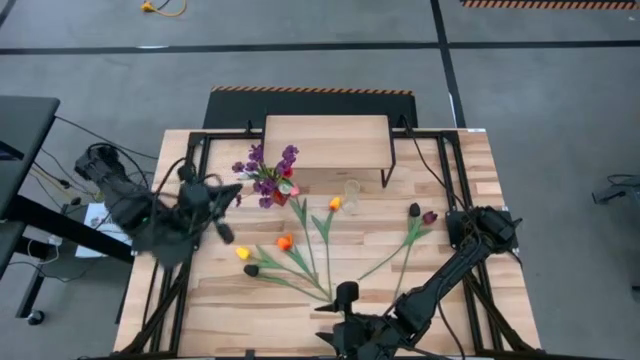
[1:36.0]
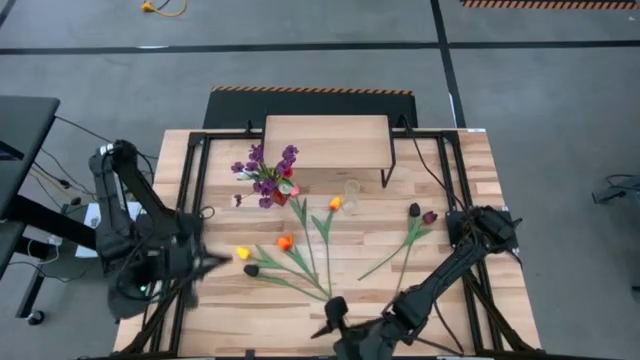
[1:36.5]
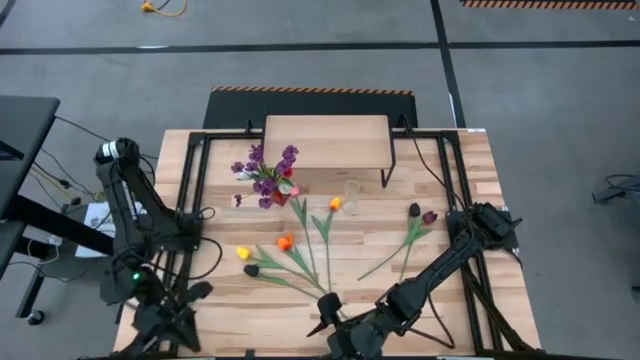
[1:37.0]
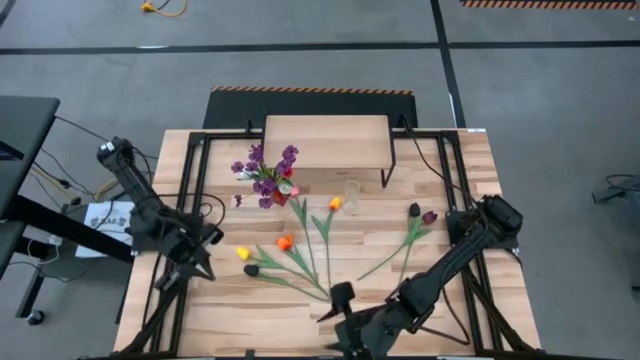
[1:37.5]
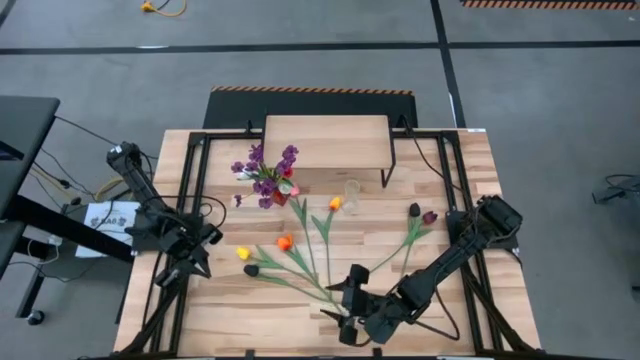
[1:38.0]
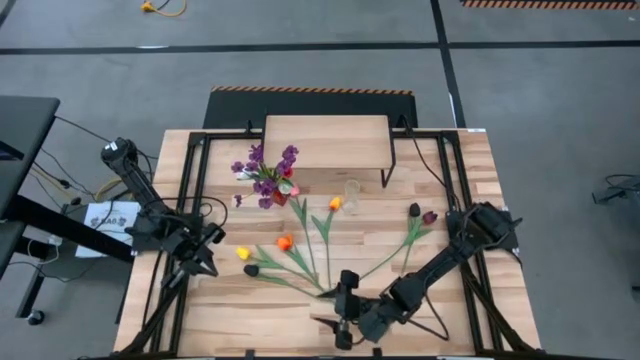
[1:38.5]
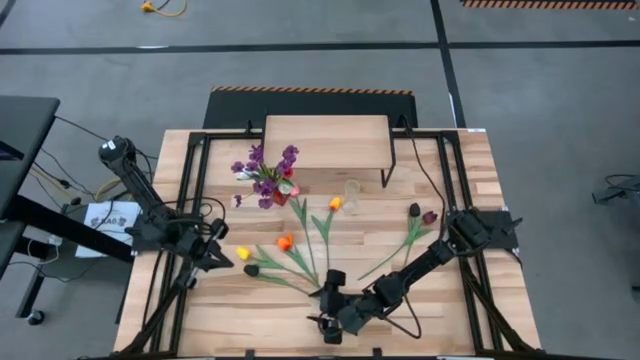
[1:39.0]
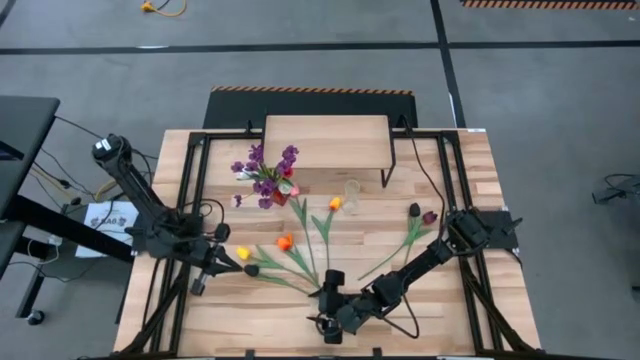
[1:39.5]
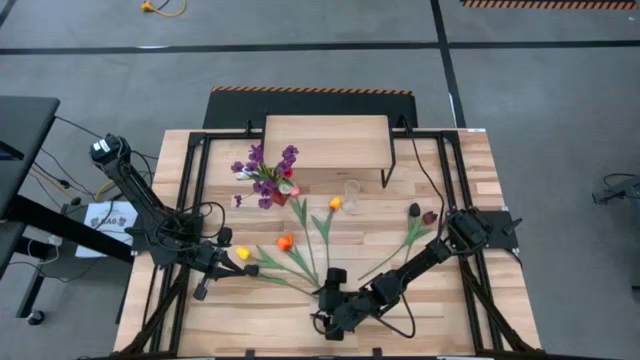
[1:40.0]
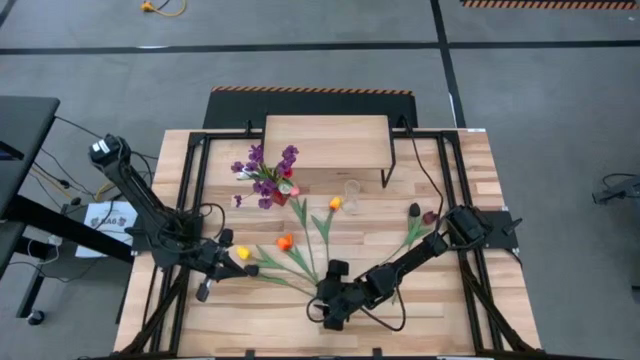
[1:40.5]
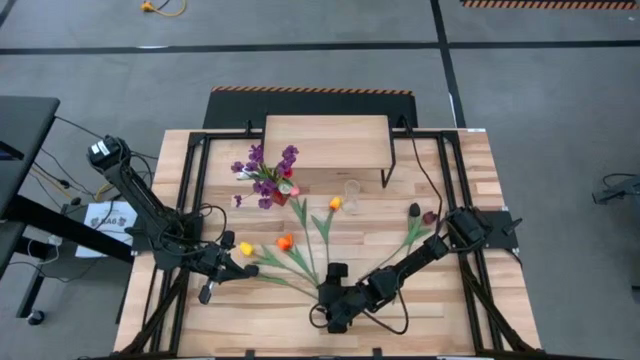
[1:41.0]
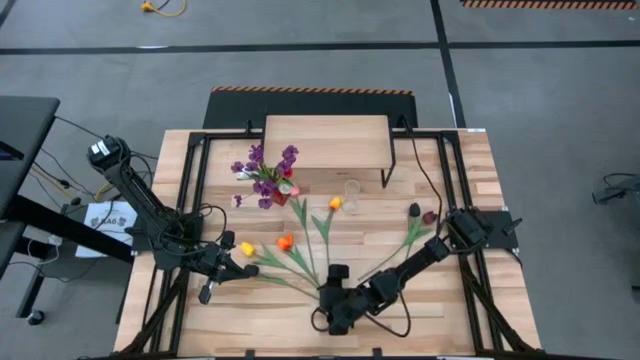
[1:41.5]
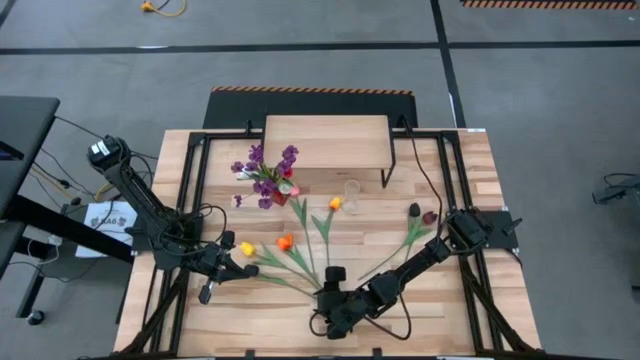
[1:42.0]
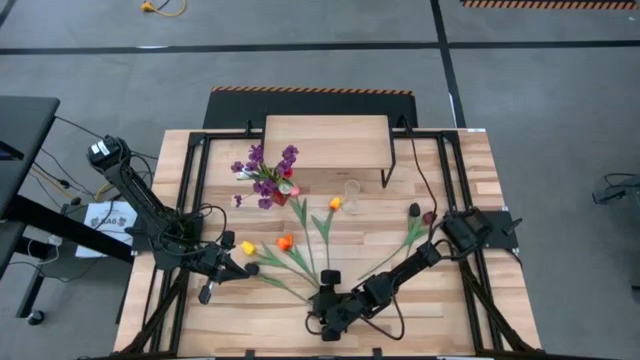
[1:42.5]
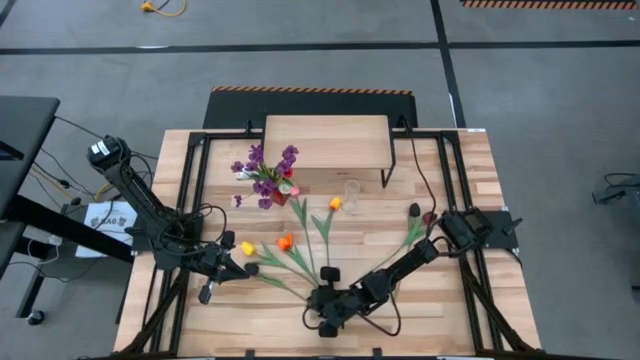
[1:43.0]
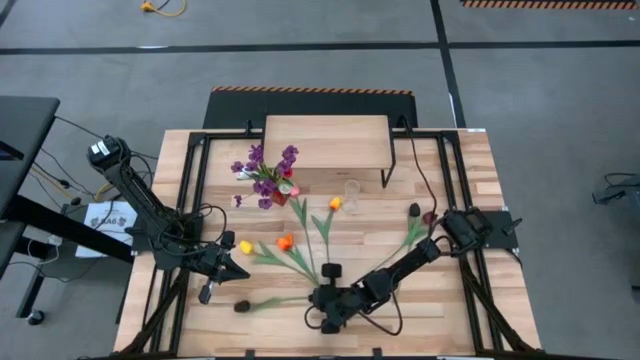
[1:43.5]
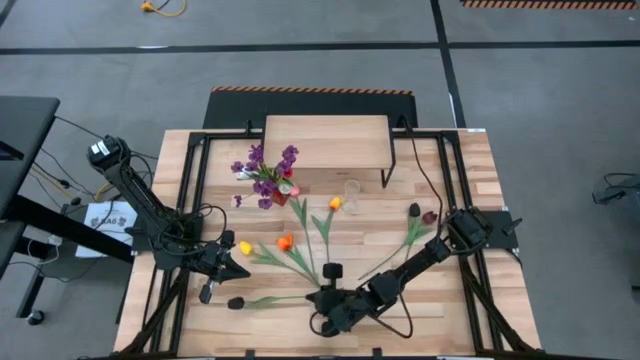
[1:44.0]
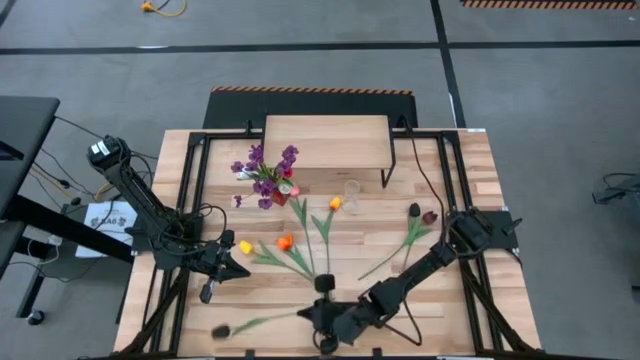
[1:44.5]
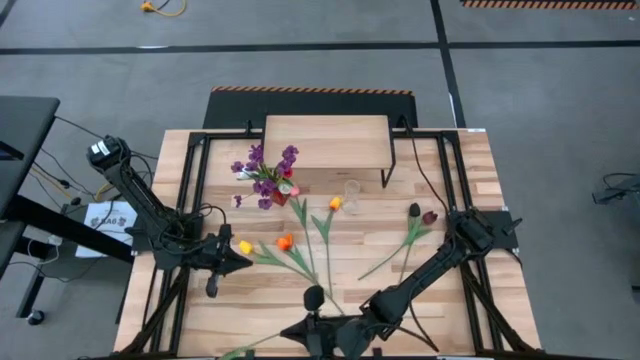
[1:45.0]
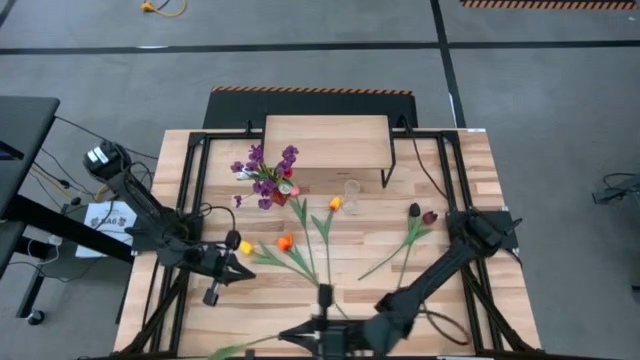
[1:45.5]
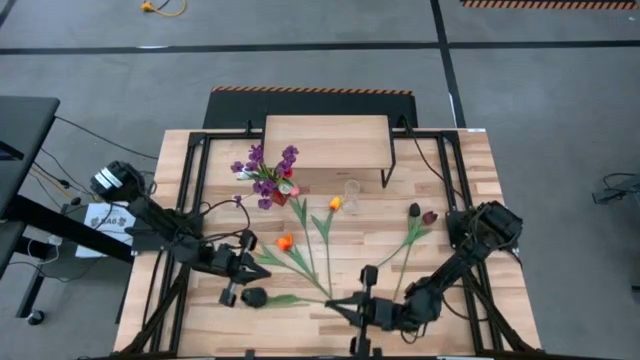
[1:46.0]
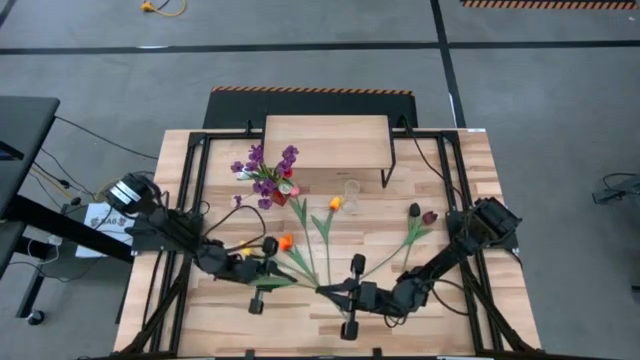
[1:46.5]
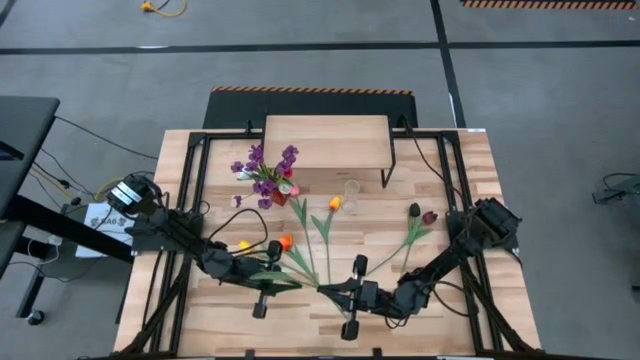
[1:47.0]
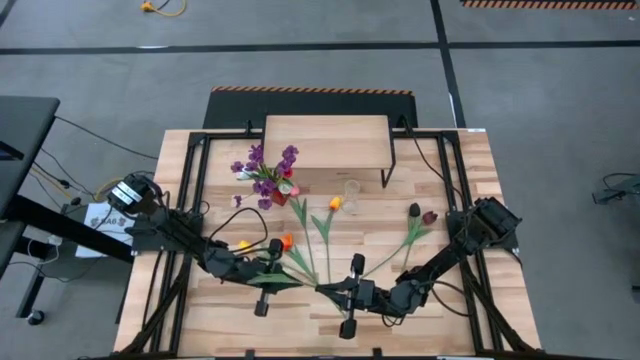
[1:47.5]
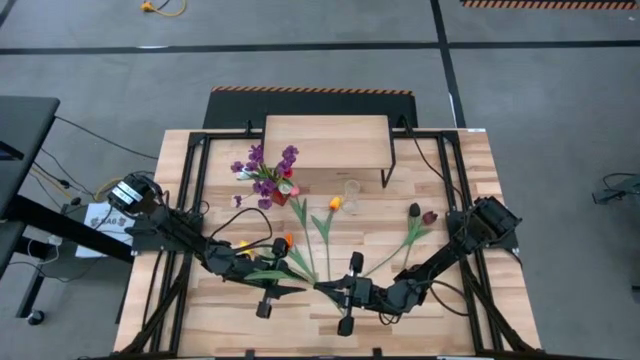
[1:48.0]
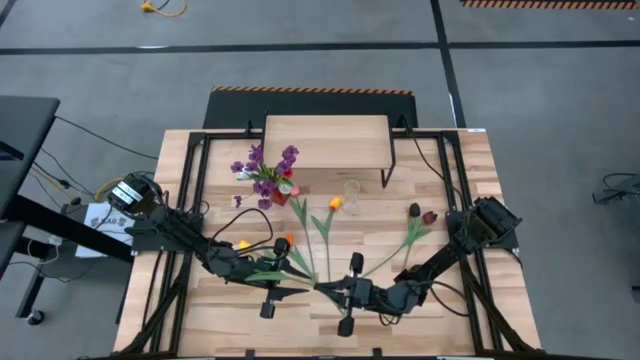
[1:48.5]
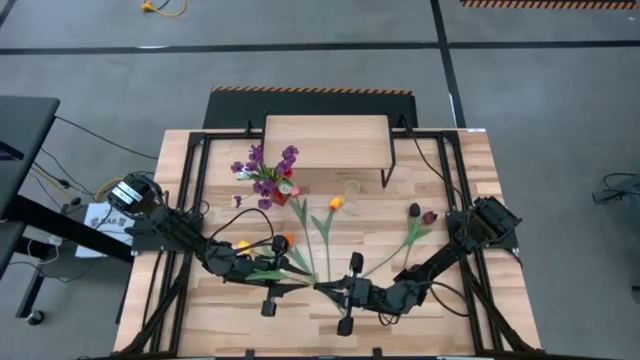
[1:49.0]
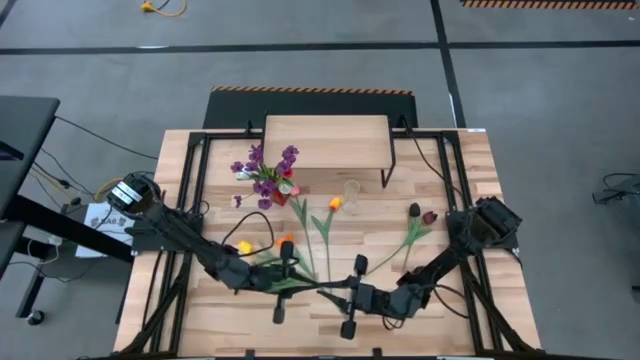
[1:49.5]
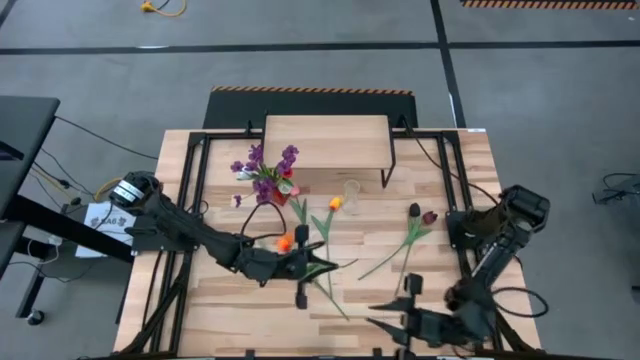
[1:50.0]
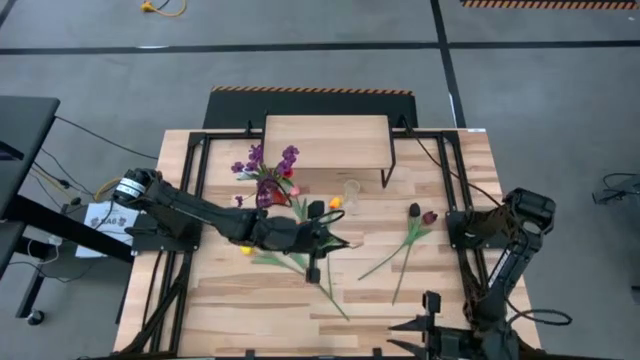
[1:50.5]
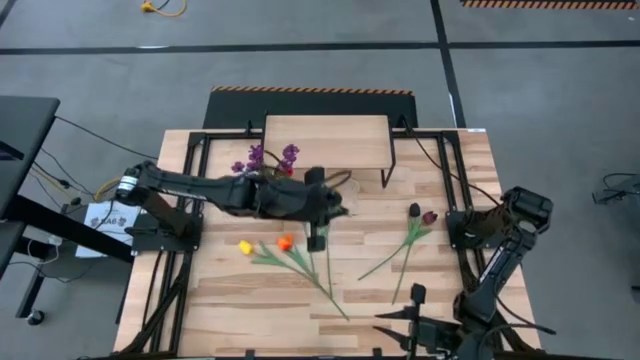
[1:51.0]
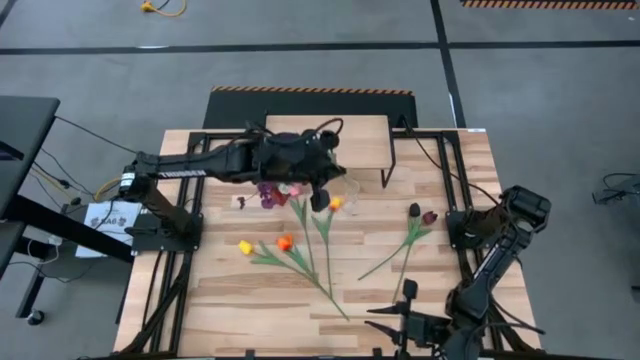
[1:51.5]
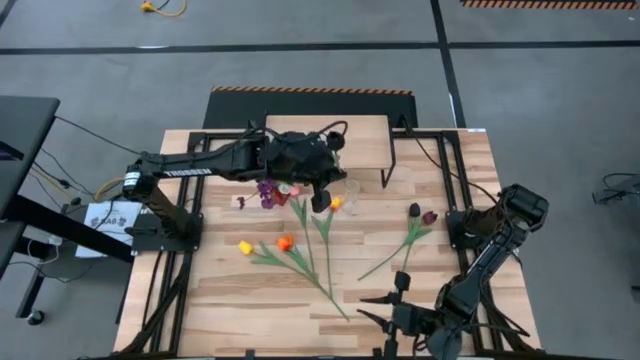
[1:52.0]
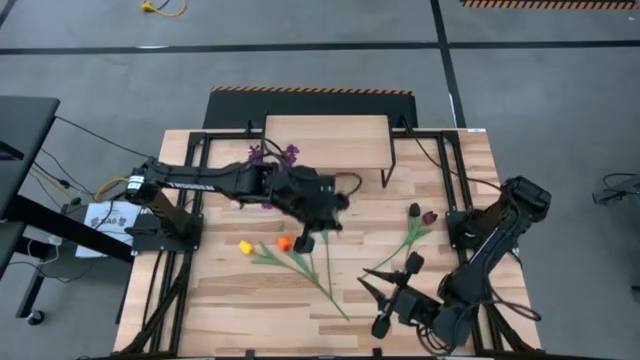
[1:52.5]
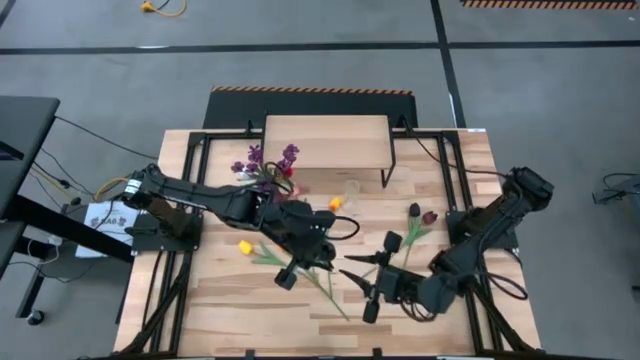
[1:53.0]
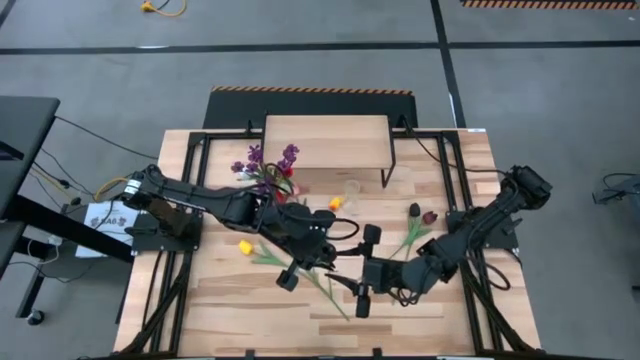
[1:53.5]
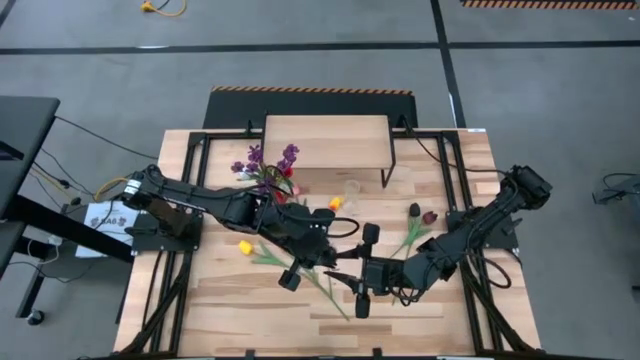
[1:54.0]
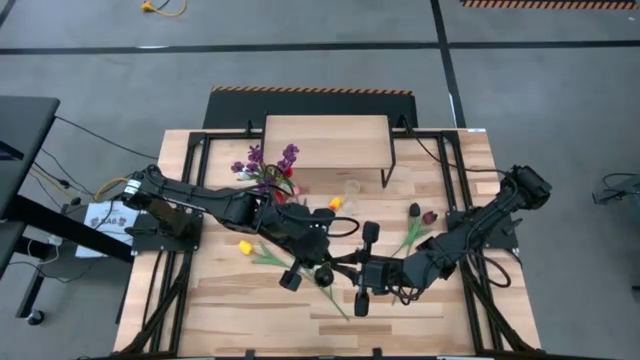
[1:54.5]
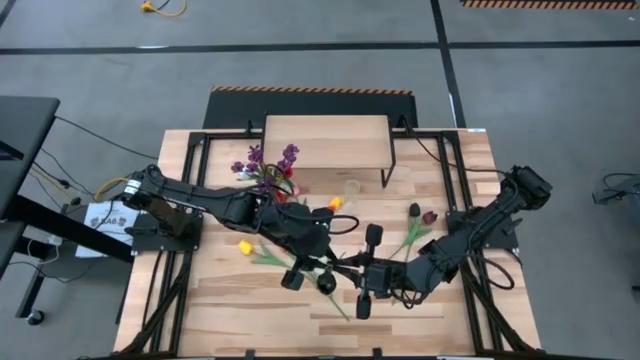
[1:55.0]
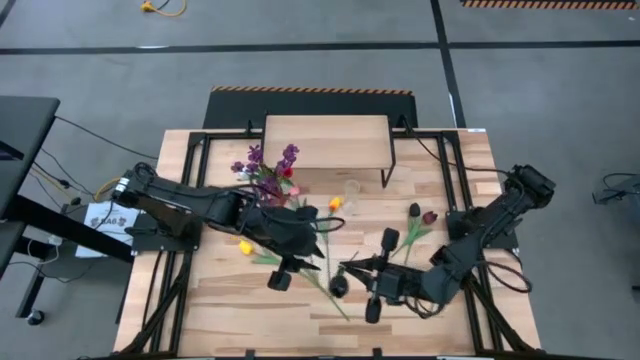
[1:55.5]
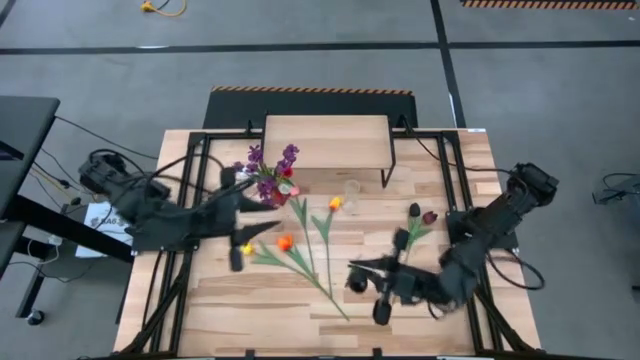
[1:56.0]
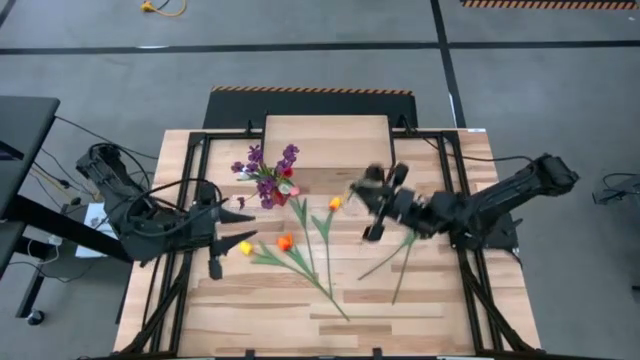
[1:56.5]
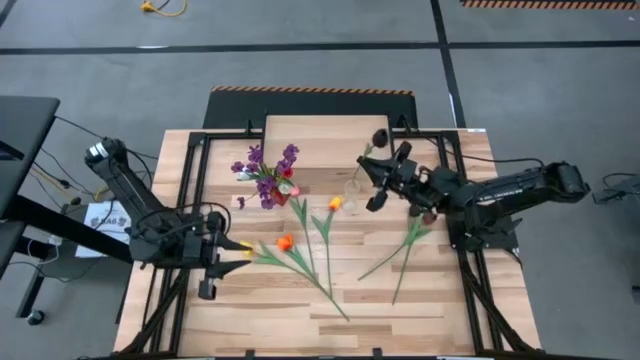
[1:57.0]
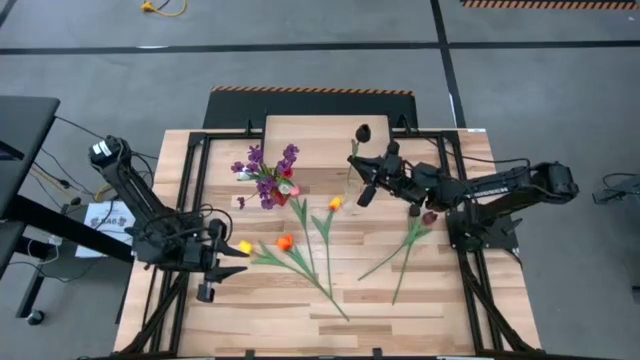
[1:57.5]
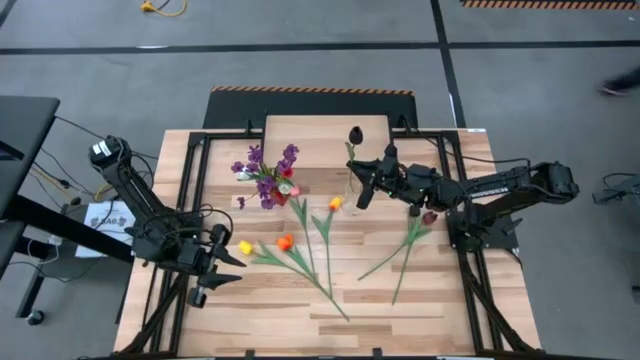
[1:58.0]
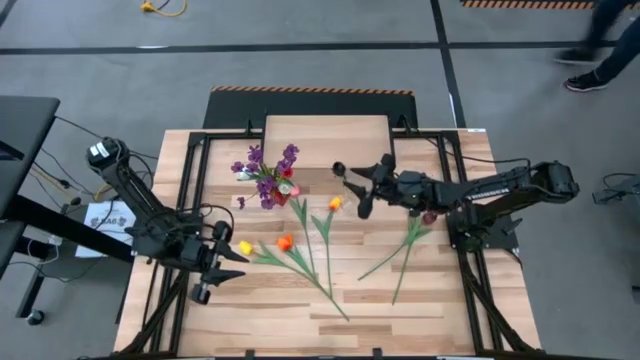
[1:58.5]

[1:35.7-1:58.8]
Task: Pick and place flowers into a vace then onto a shelf
Put the bottom black flower into the transparent flower vase
